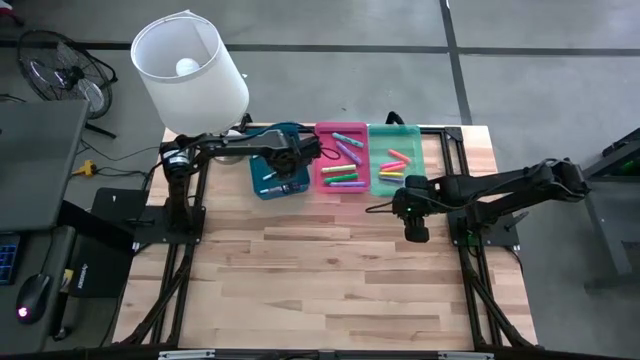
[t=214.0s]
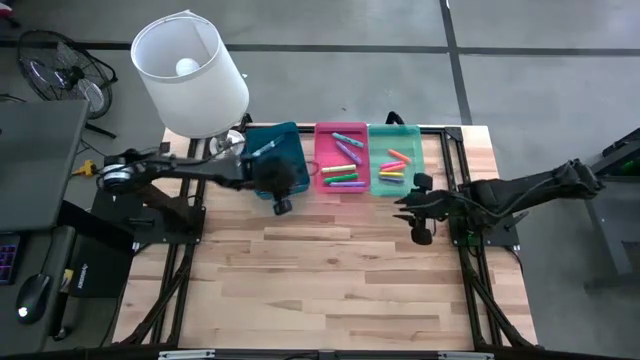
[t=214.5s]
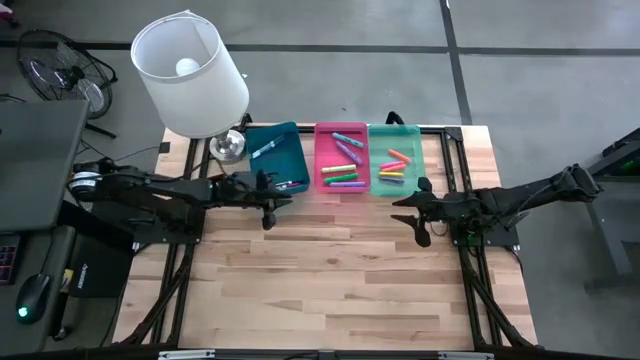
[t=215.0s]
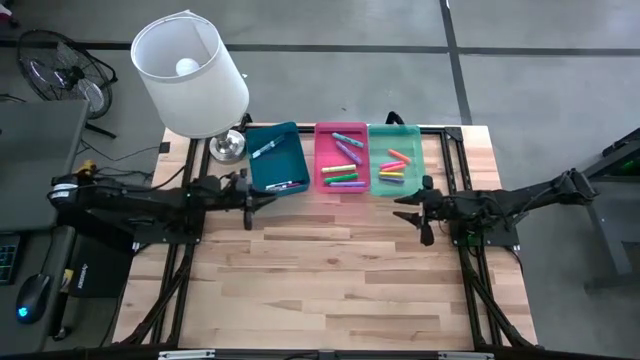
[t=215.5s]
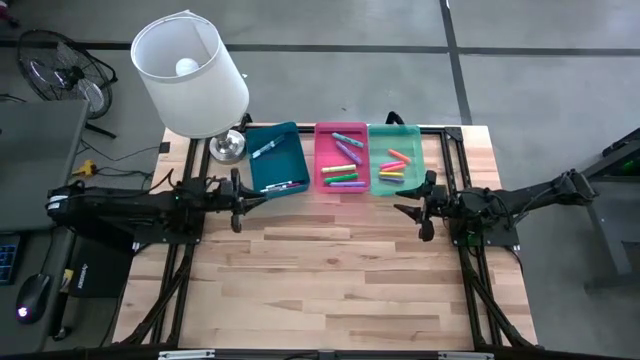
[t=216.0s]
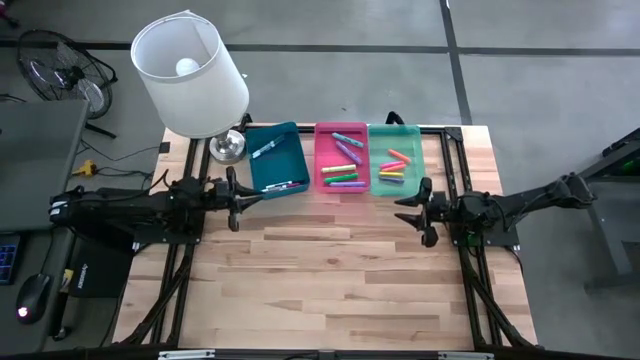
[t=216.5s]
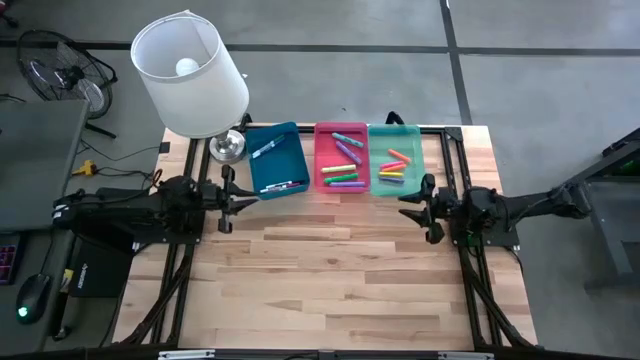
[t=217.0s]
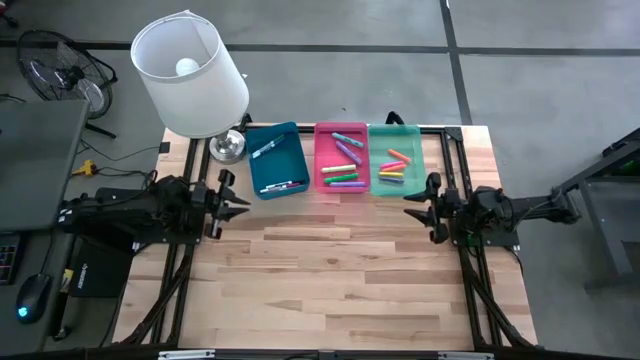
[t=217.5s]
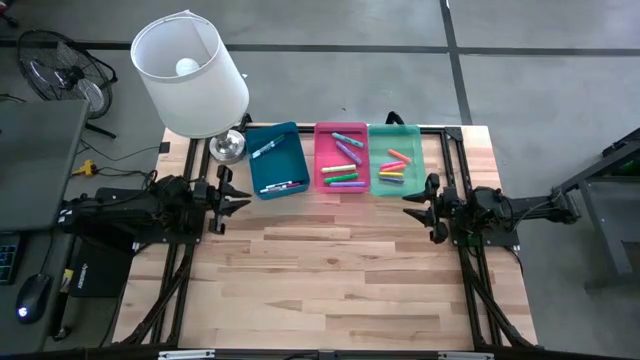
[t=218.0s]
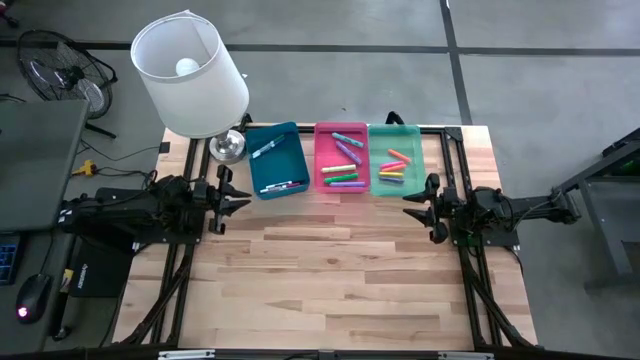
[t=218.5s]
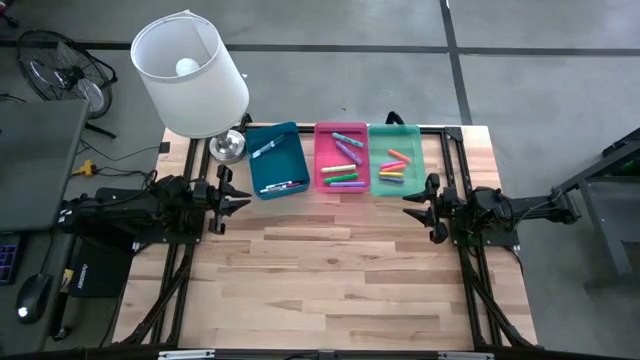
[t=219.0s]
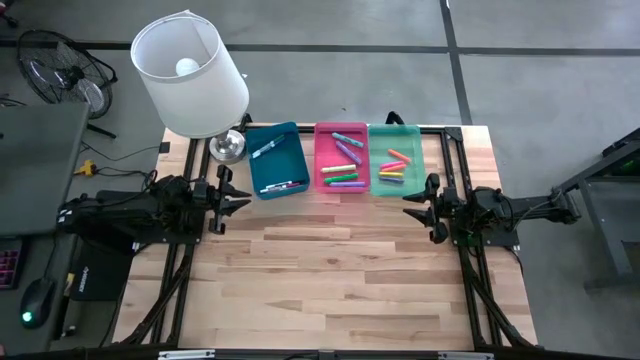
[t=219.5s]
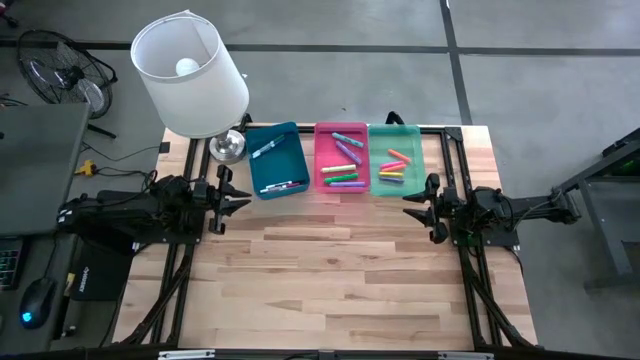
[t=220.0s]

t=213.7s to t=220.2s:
Task: Pick & Place Markers
Return to Home Position

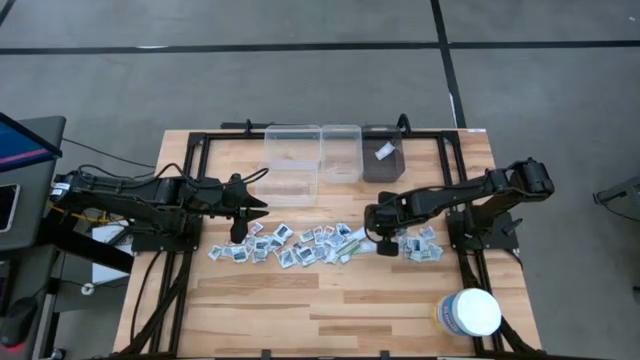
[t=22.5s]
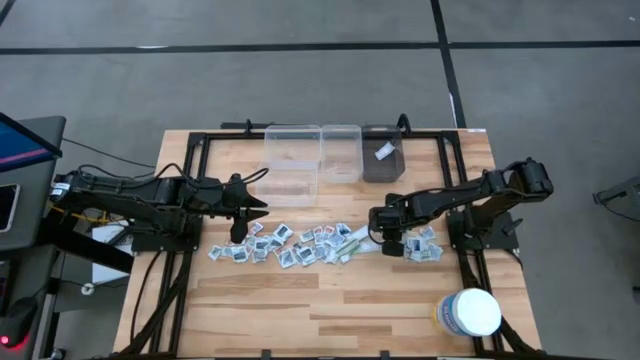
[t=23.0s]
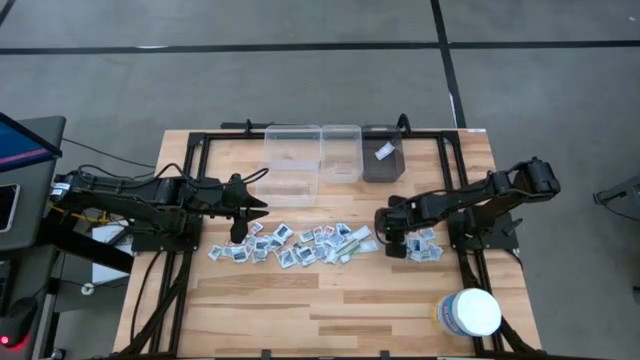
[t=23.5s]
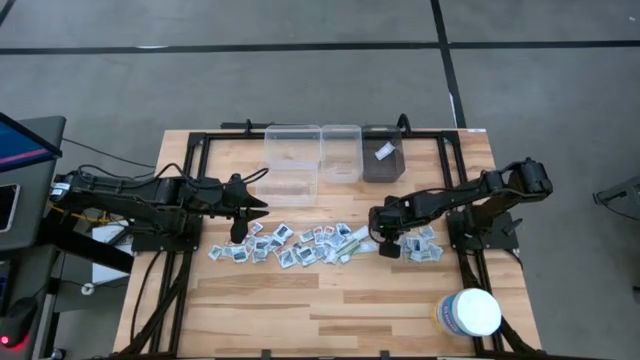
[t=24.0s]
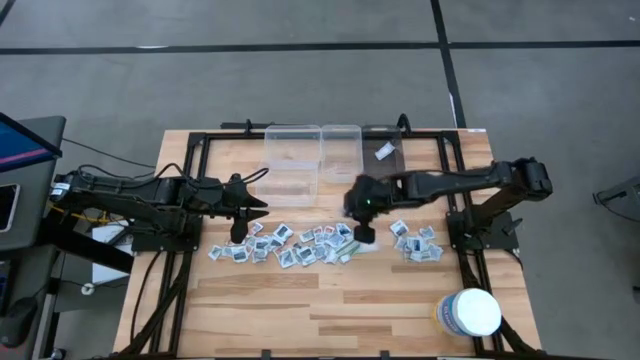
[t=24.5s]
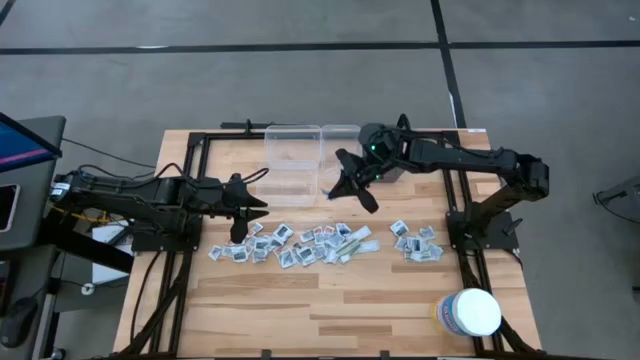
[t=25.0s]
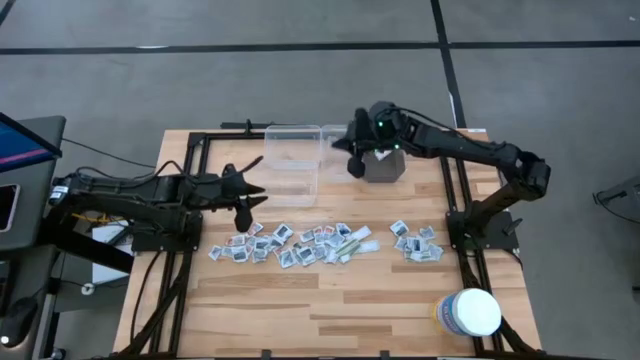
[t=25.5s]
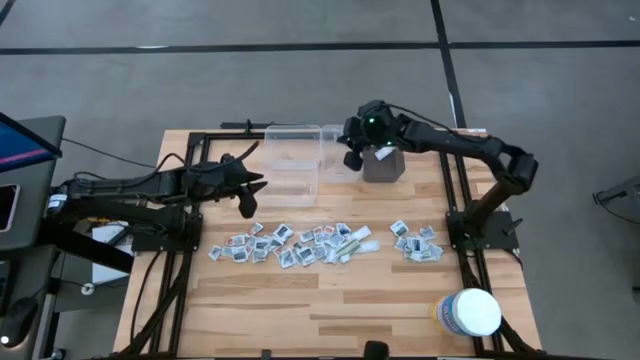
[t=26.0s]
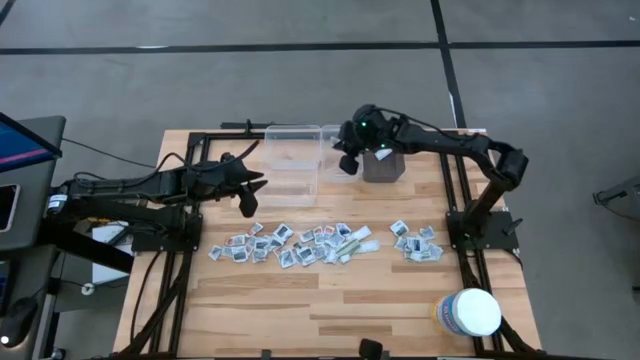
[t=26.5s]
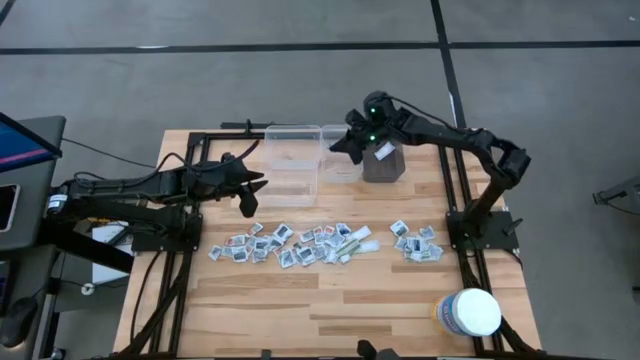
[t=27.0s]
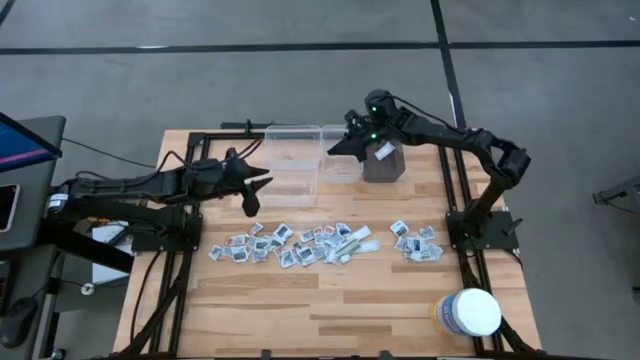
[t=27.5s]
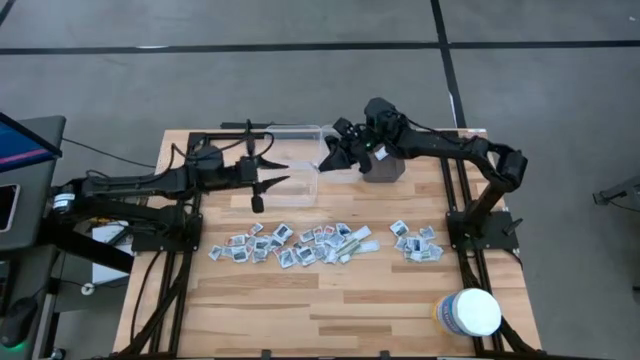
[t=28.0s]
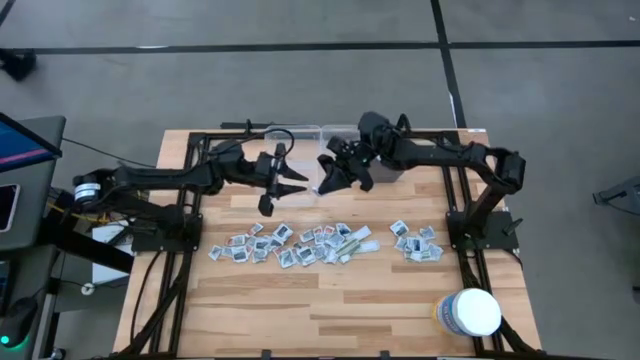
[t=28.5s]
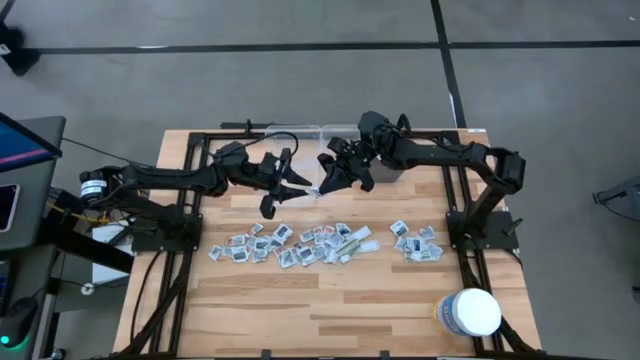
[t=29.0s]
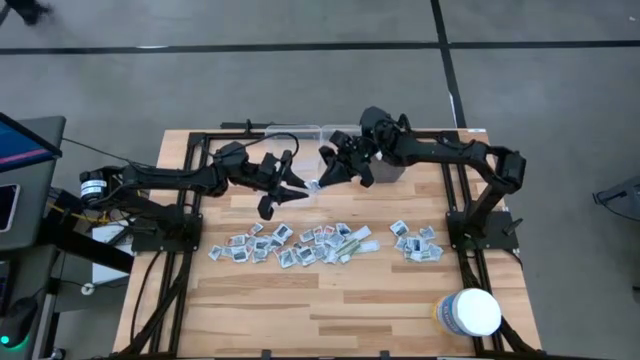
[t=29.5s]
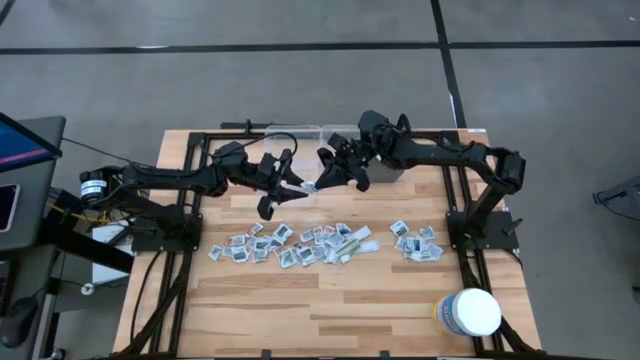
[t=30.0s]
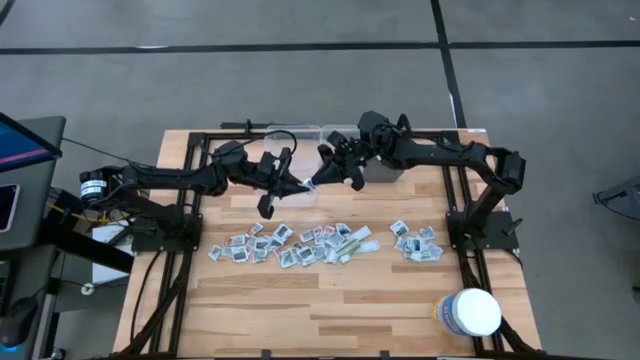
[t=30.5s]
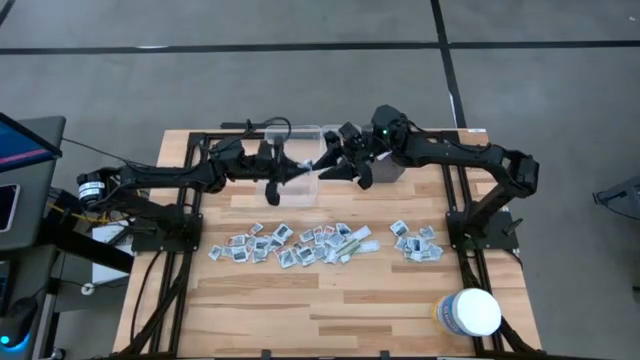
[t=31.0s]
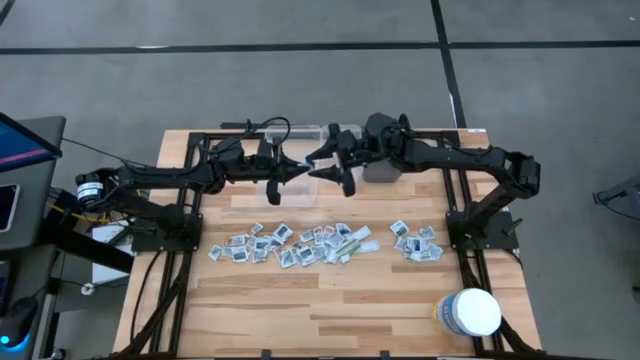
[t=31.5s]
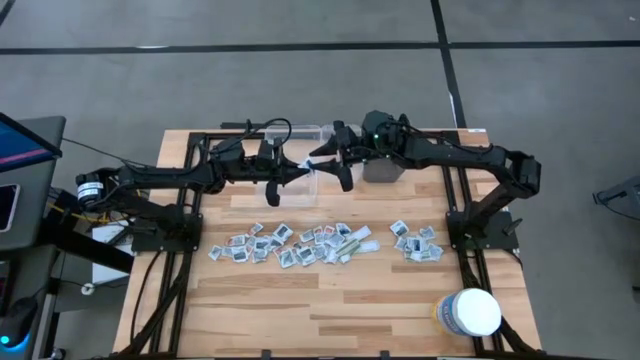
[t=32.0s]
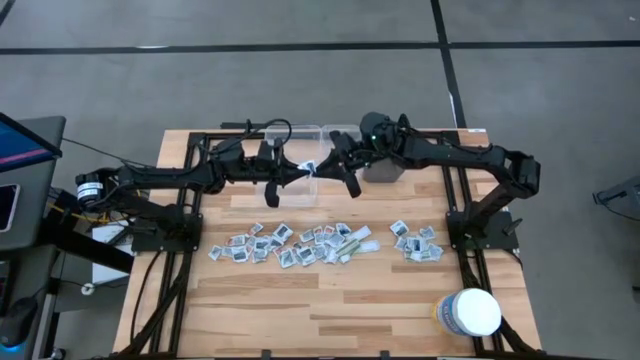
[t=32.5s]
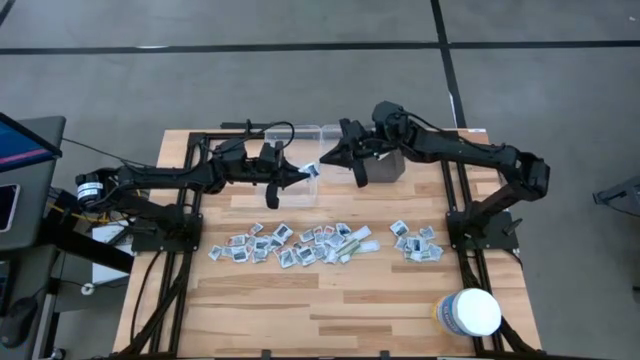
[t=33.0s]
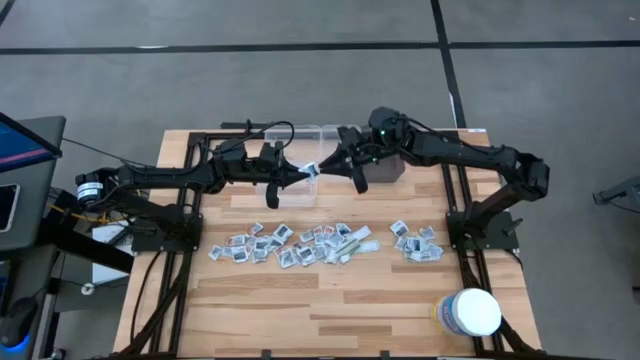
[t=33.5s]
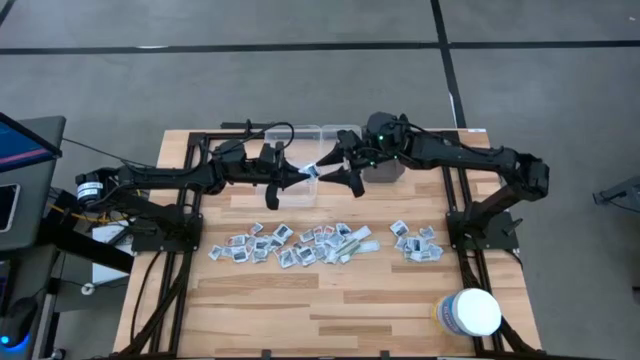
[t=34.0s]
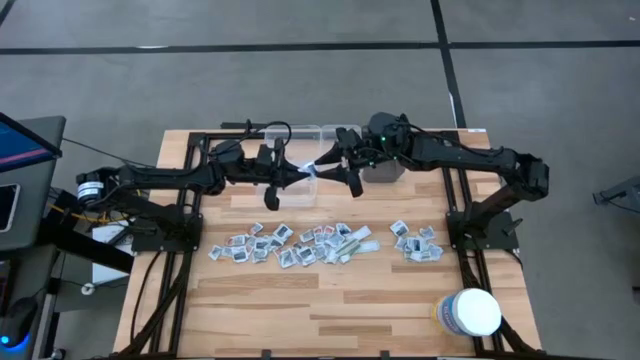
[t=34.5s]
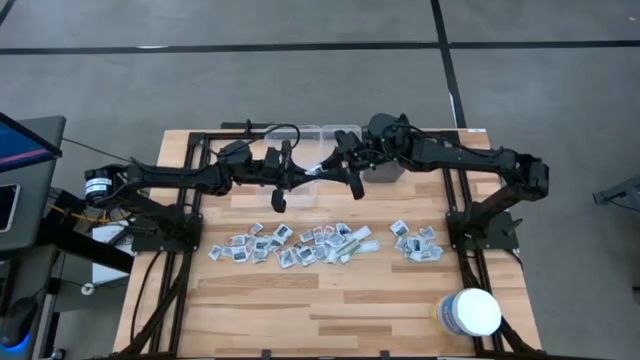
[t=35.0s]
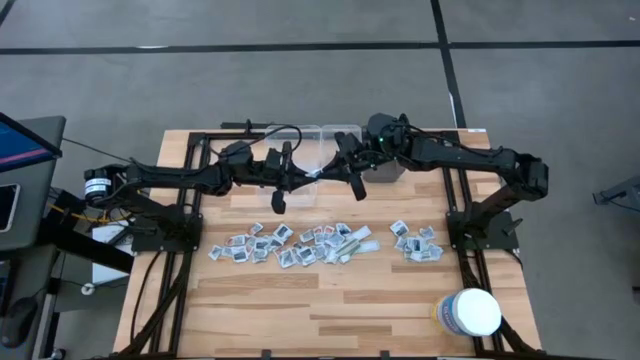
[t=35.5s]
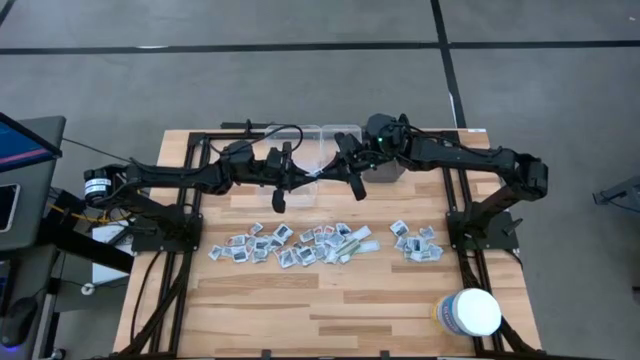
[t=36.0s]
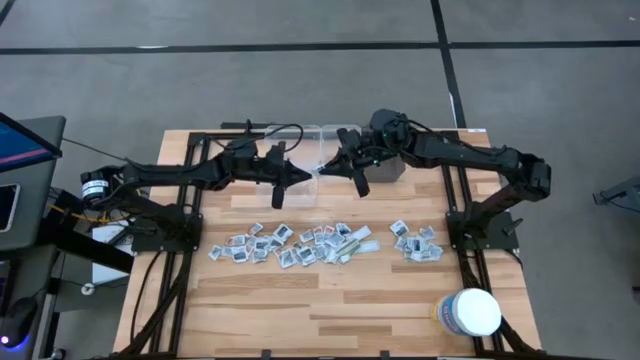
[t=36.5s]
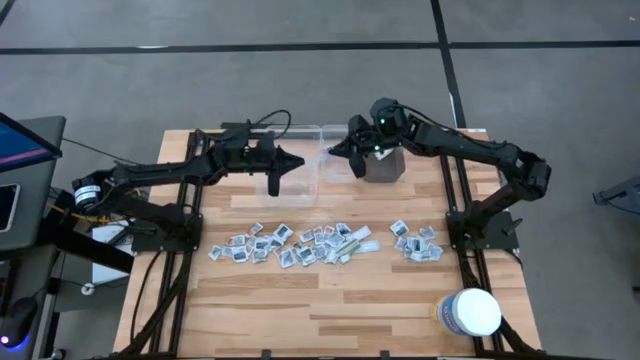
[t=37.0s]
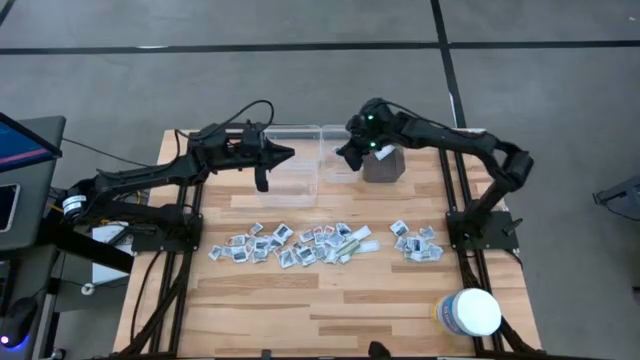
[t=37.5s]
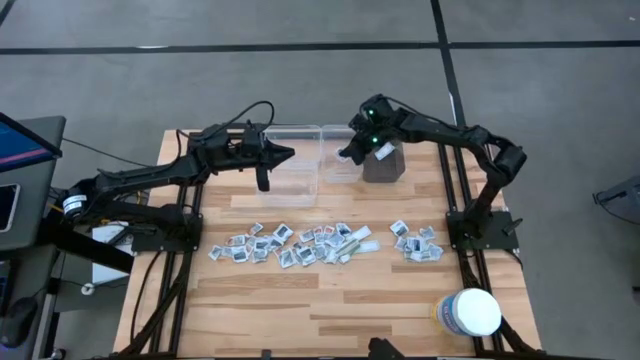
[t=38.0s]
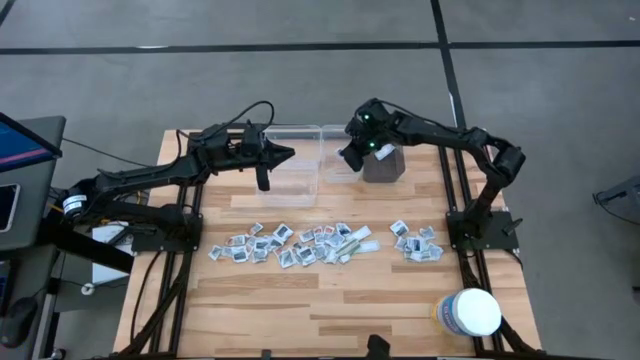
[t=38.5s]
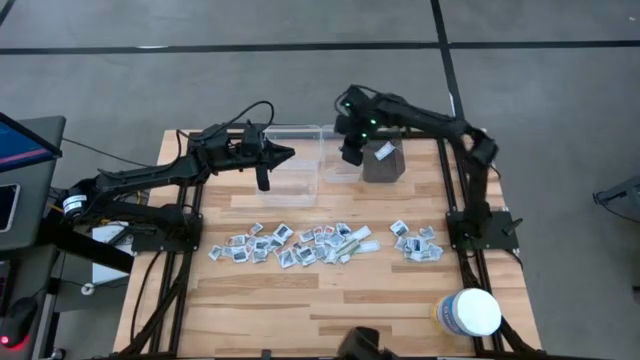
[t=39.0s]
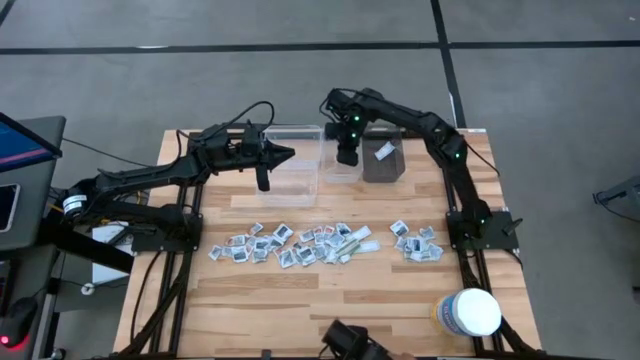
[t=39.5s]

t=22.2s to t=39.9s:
Task: Pick & Place First Aid Supplies
Put the alcohol pad into the top right transparent bin
